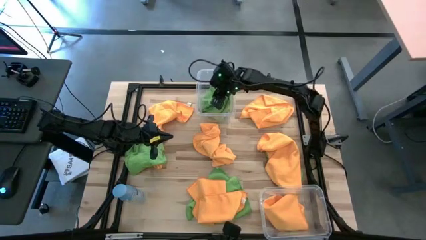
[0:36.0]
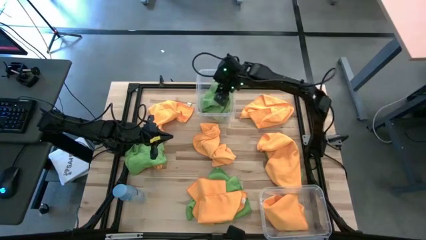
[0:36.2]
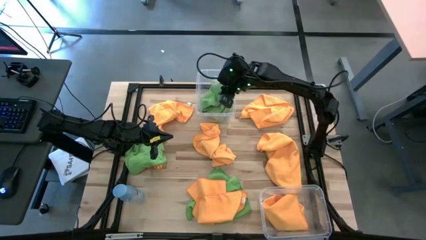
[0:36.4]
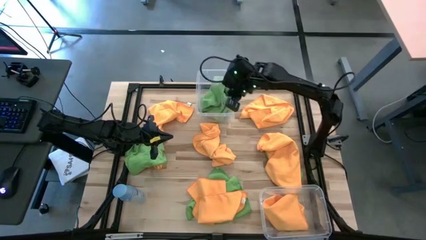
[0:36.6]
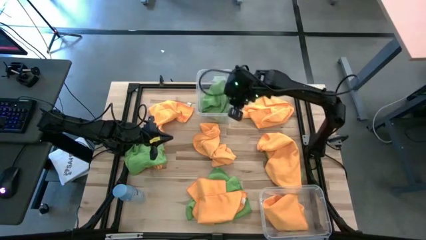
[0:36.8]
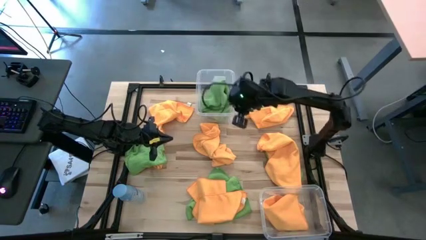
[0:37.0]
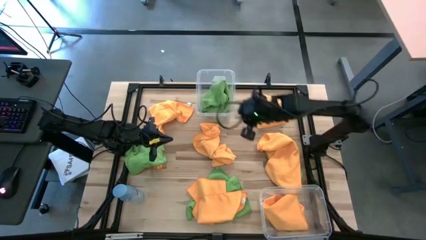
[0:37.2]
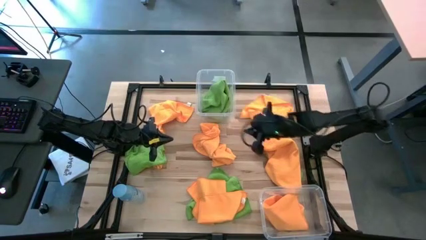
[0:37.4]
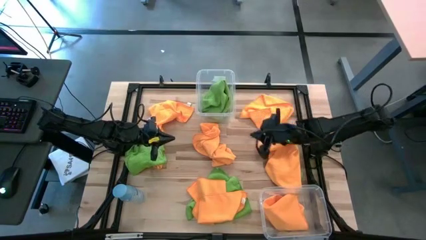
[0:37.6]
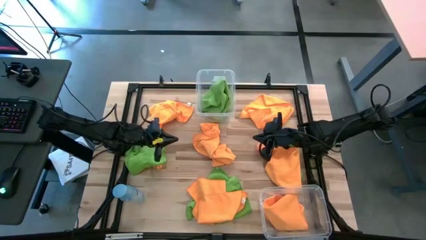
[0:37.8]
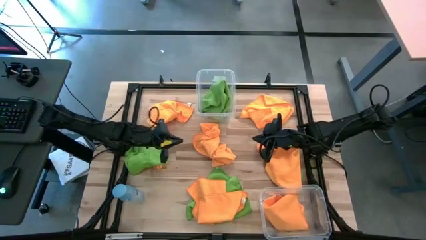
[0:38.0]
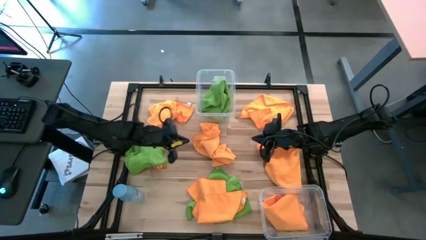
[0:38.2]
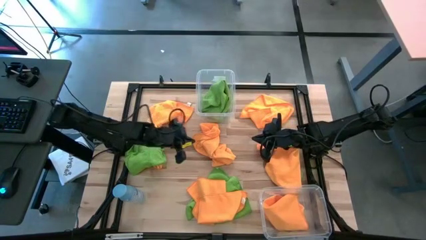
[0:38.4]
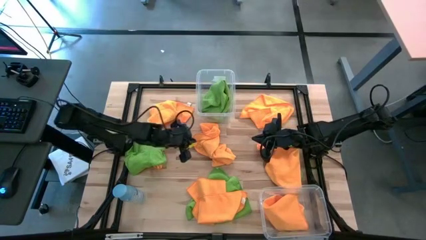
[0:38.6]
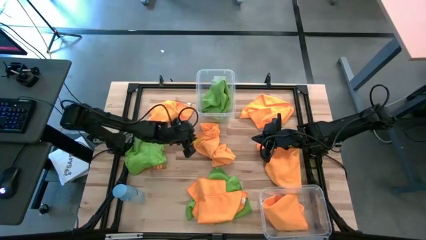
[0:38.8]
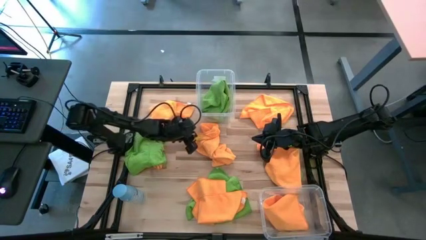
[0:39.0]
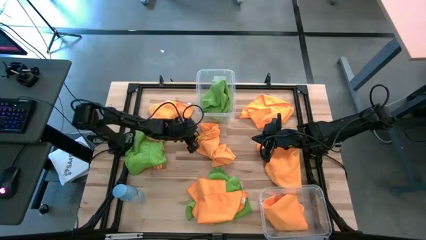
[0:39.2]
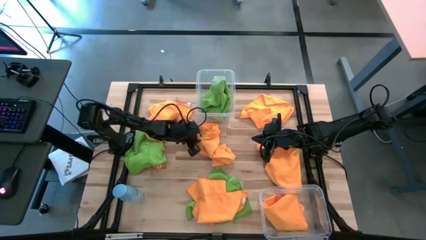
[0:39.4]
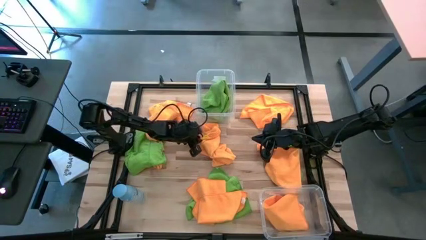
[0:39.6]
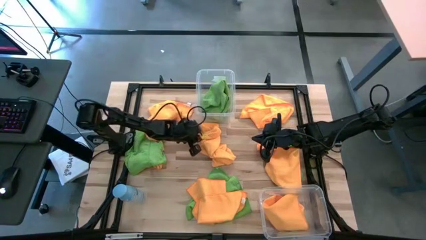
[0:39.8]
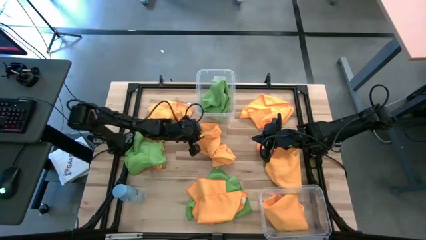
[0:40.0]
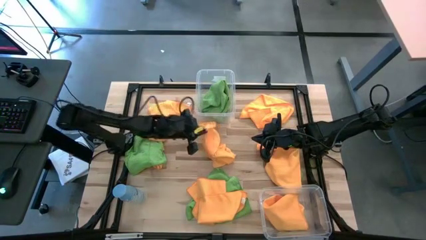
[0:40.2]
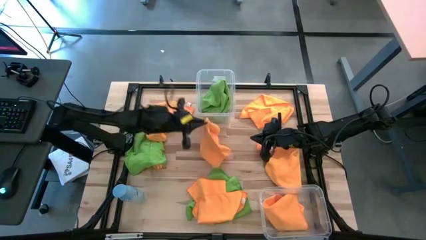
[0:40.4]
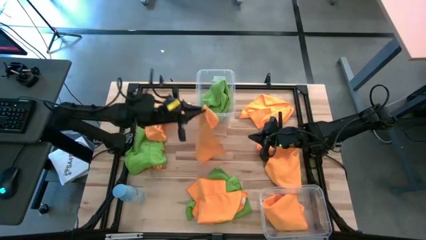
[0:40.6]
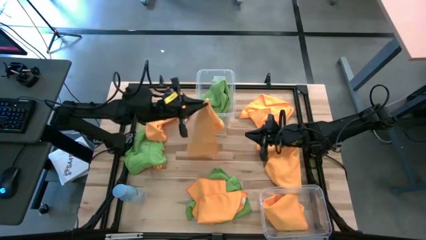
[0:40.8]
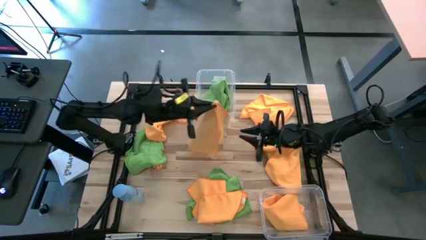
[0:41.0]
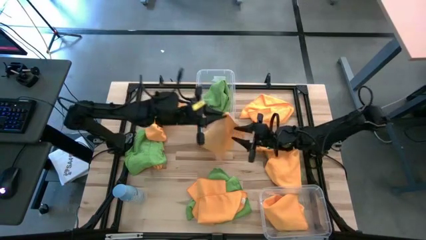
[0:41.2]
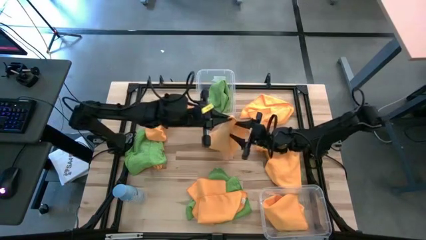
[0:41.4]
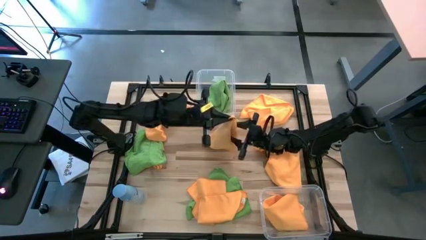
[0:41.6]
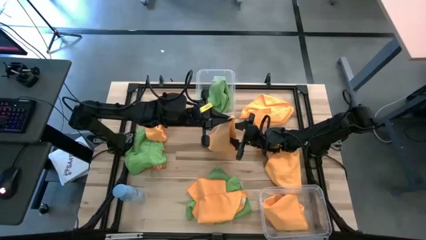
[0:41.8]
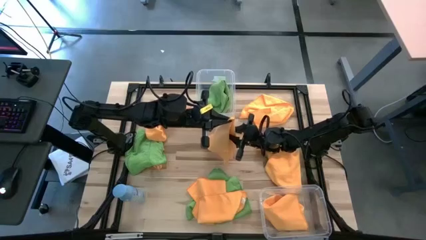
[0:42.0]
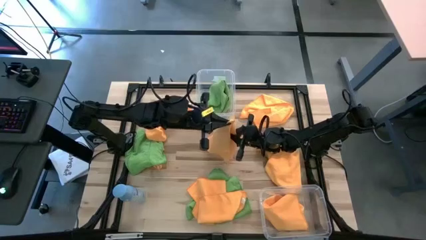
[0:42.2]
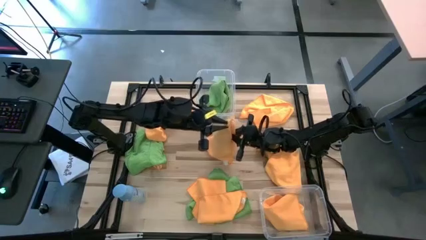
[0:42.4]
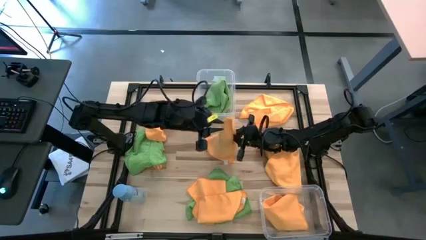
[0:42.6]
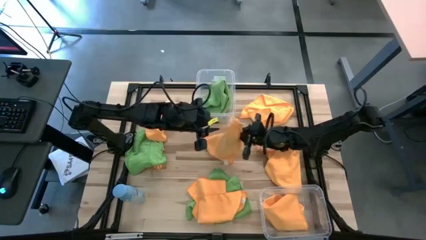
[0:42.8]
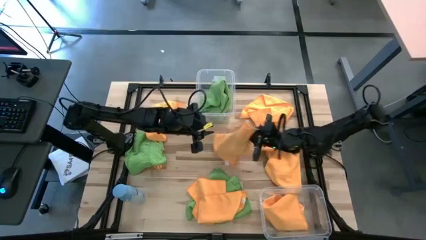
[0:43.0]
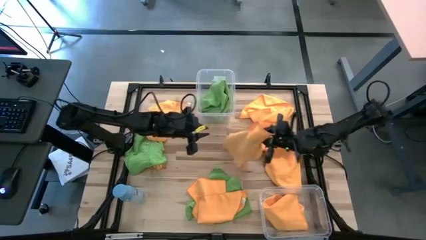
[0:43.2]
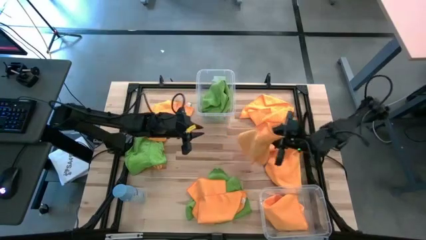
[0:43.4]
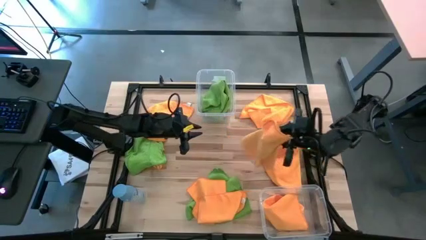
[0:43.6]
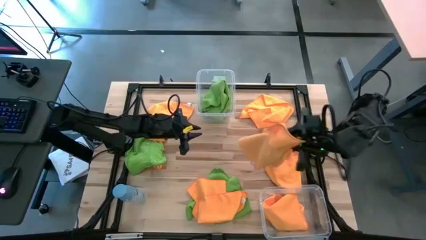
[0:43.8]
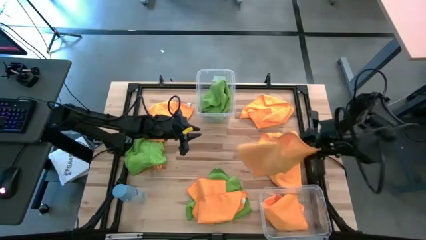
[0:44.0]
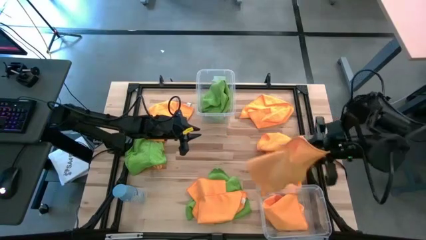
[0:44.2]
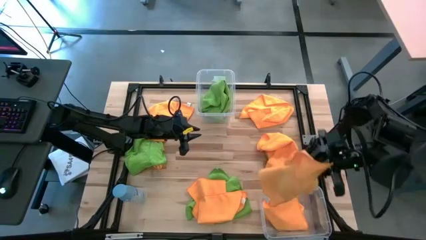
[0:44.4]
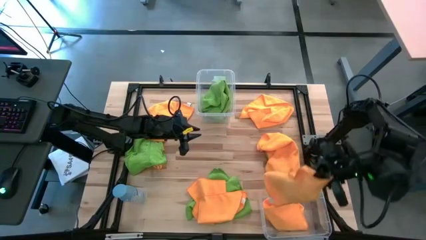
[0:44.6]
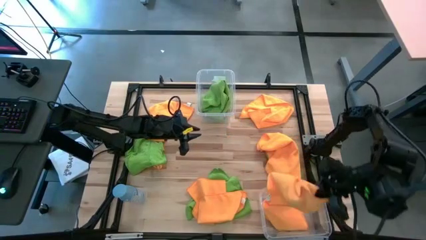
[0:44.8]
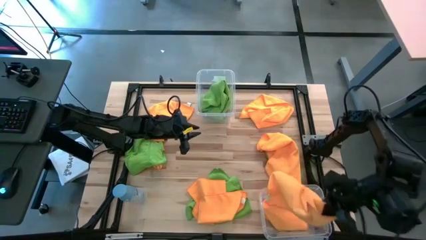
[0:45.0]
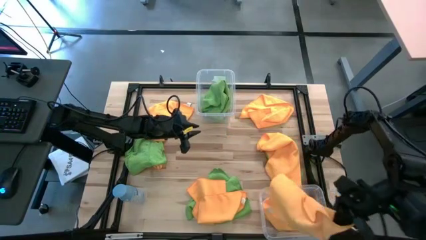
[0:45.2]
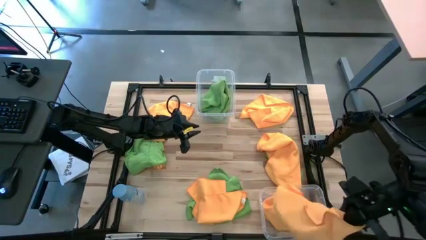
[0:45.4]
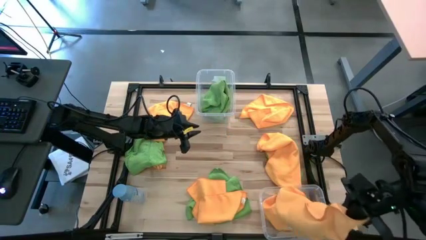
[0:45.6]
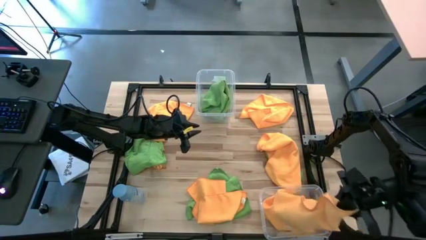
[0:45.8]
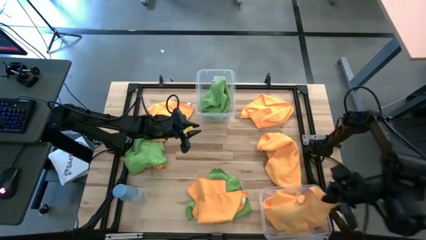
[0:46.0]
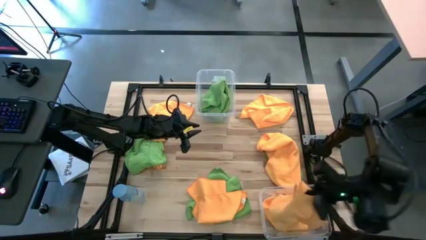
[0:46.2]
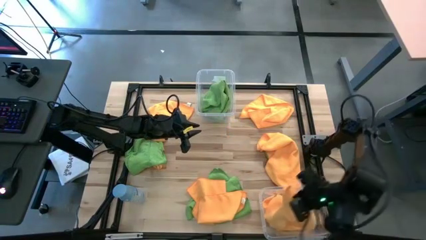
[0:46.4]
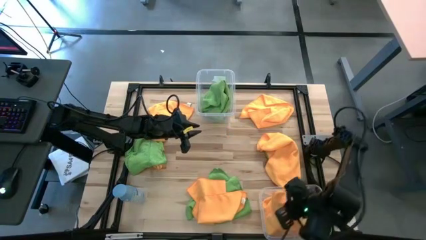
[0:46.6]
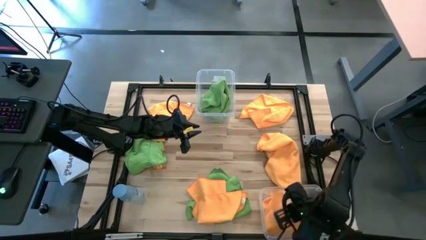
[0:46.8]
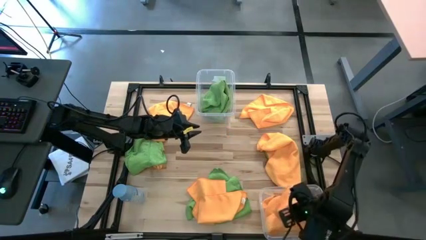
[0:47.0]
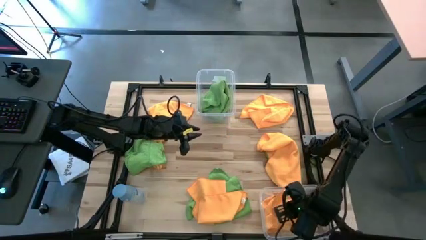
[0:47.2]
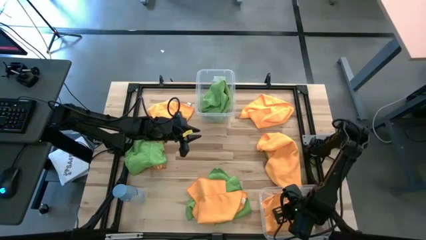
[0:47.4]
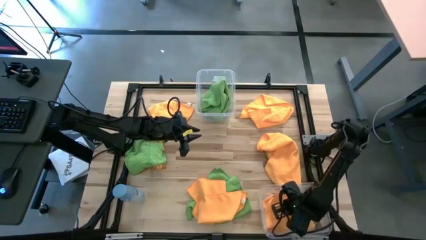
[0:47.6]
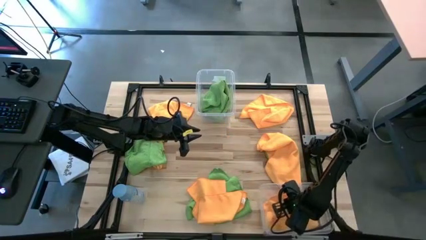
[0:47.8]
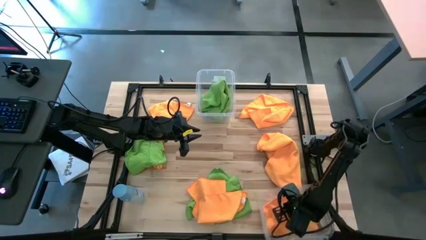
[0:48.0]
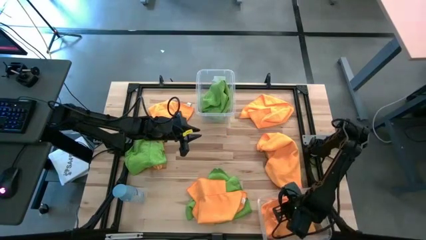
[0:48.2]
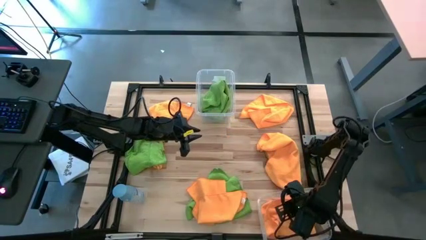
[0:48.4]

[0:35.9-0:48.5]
Task: Sort microfiber towel by color & place in baskets
Put the orange microfiber towel into the bottom transparent bin
